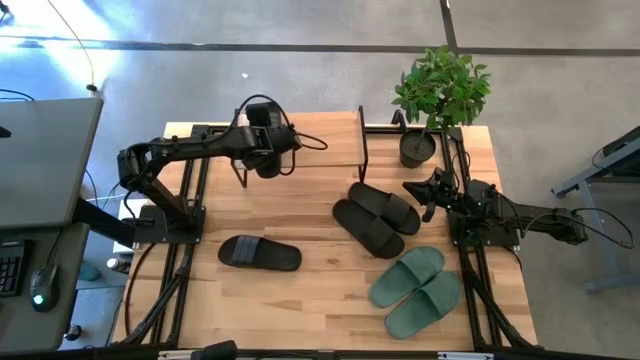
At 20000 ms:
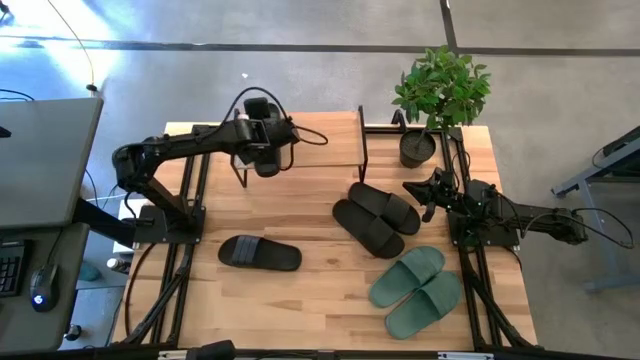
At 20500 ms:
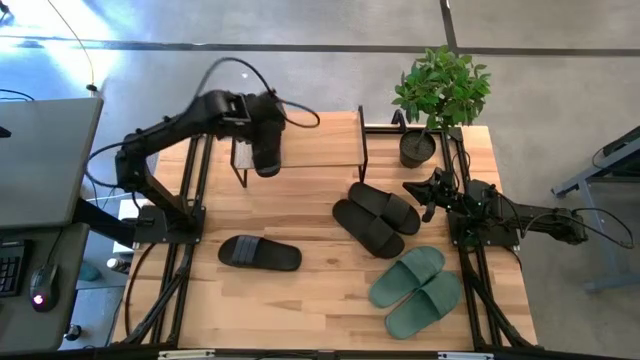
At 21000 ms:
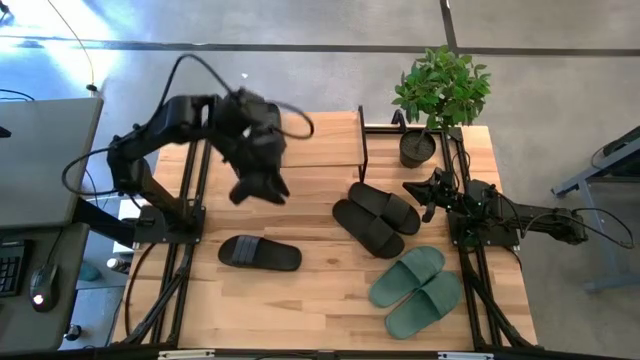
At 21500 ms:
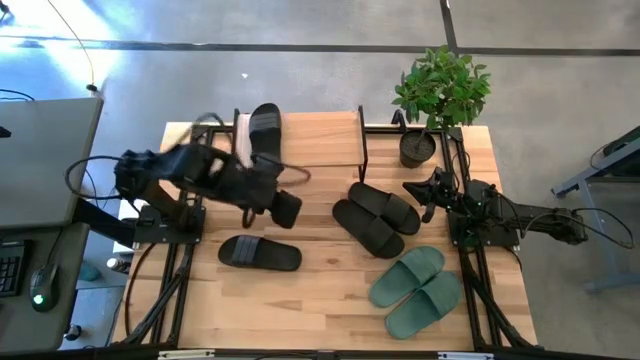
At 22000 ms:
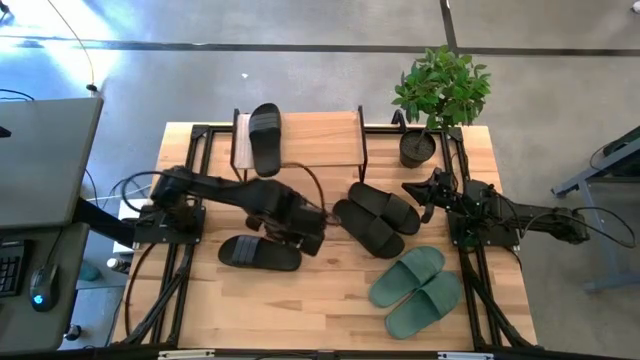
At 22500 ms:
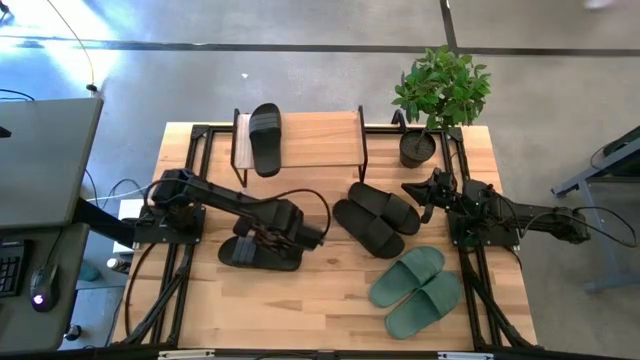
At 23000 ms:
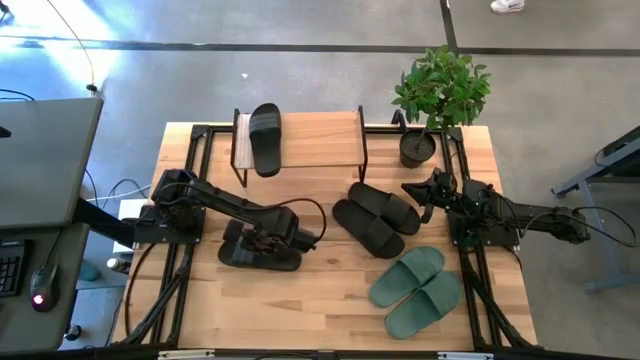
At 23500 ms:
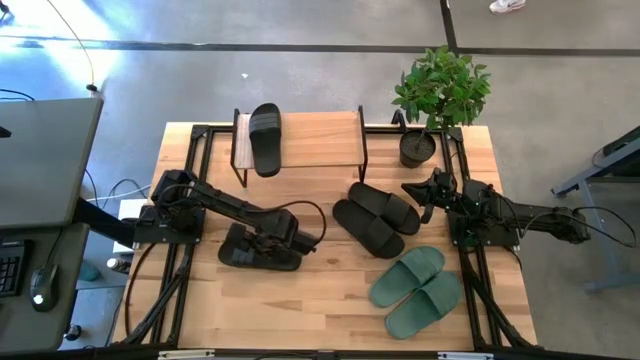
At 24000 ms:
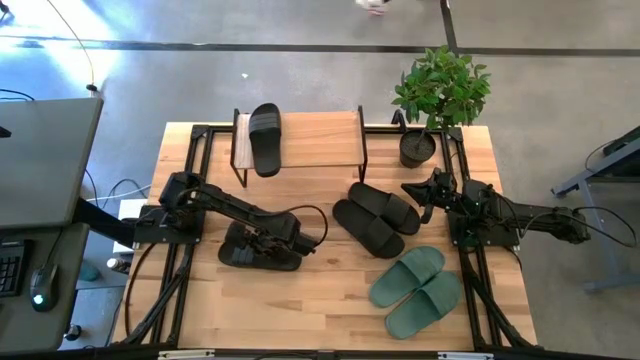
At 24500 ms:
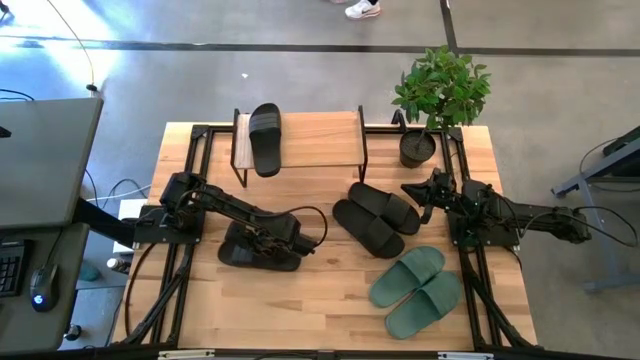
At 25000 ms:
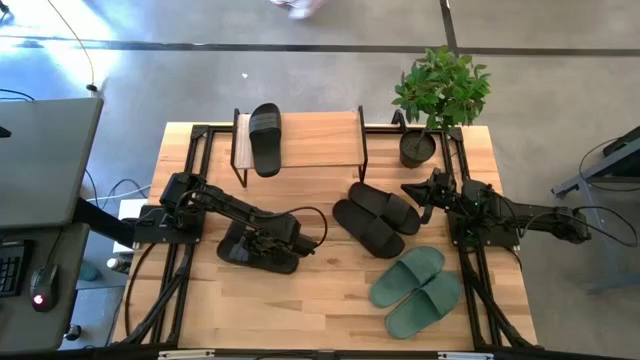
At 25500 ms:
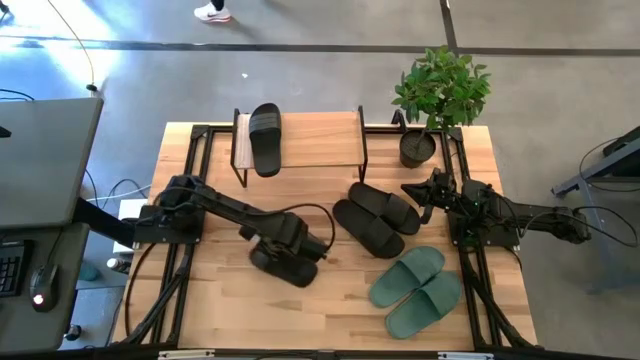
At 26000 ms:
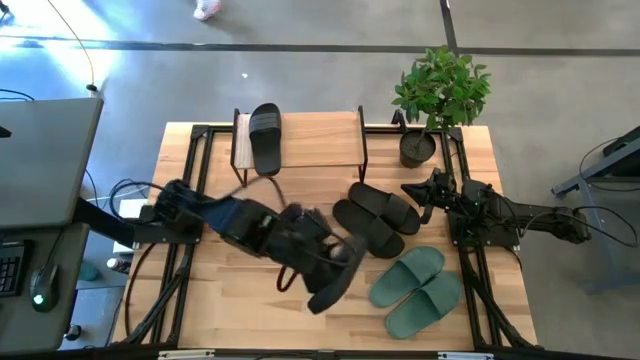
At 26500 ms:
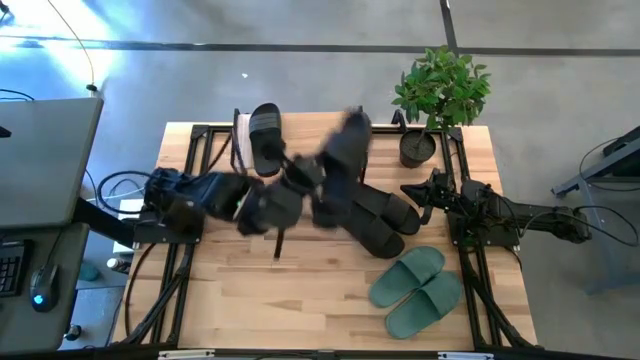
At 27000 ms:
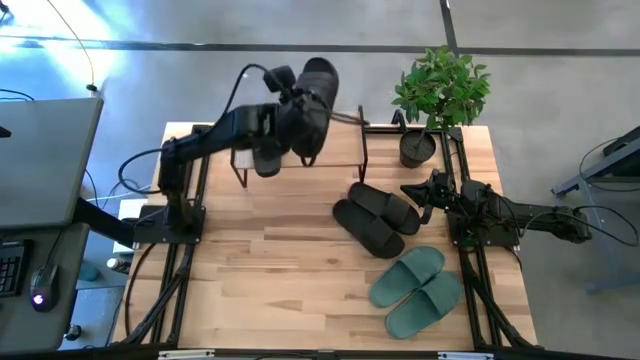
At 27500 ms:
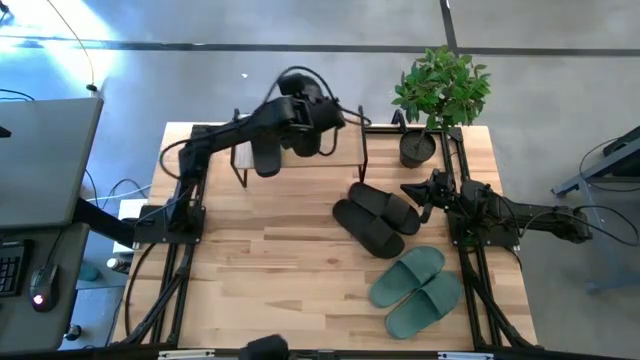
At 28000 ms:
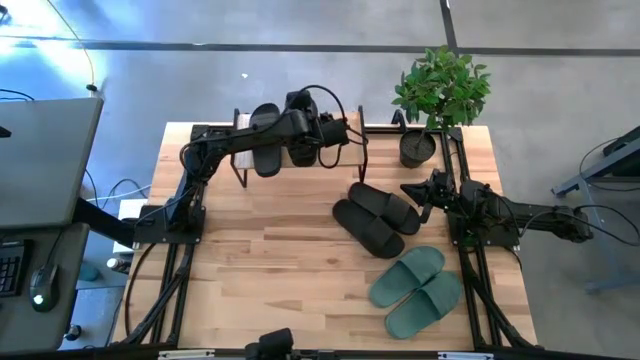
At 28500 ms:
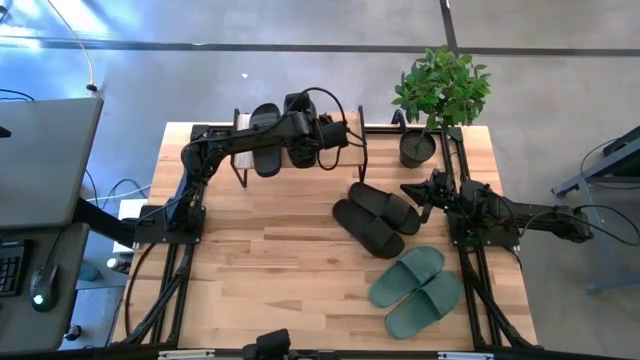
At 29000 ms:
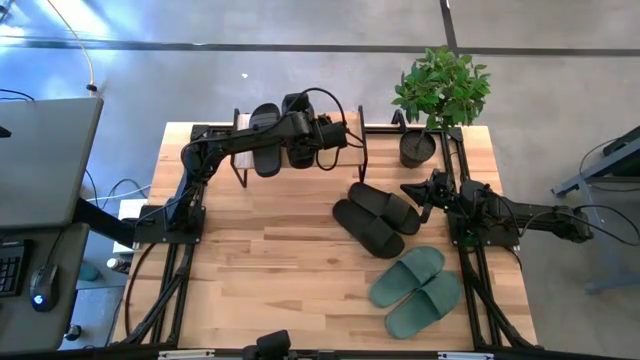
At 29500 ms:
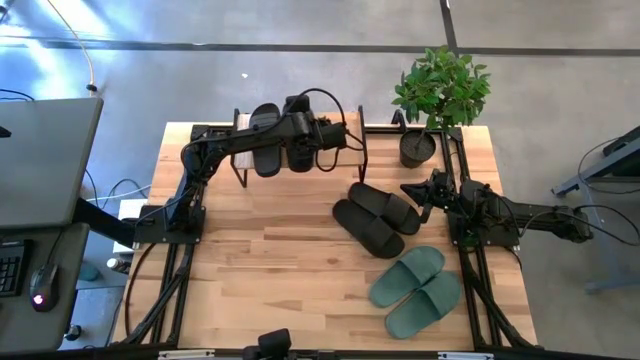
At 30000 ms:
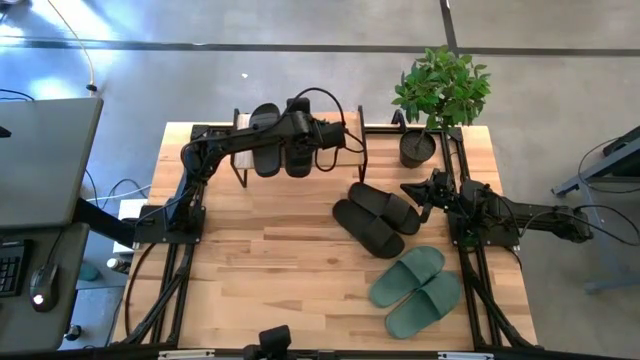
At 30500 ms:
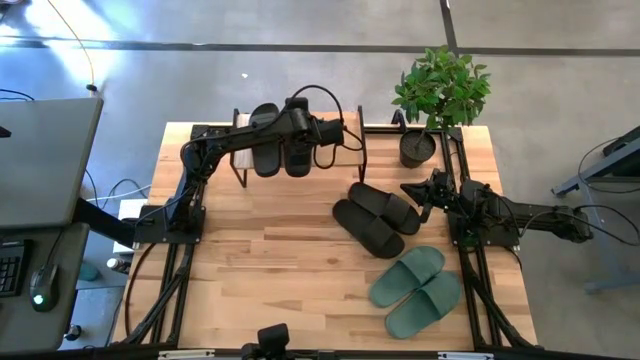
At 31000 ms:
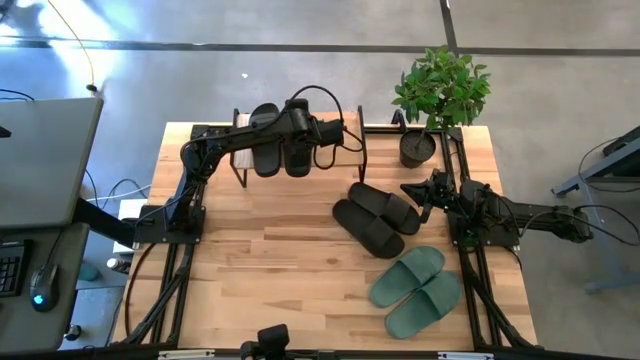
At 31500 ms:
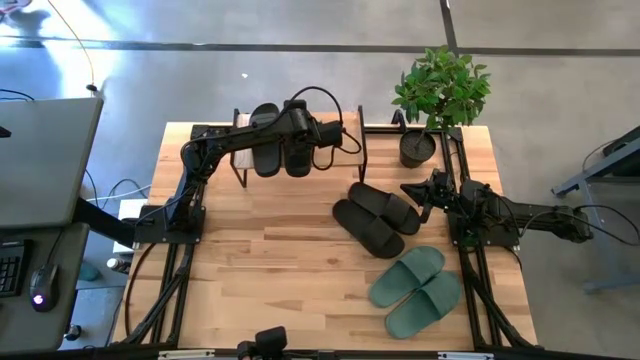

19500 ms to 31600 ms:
Task: Pick and place slides into the shelf
Put the bottom slide on the shelf

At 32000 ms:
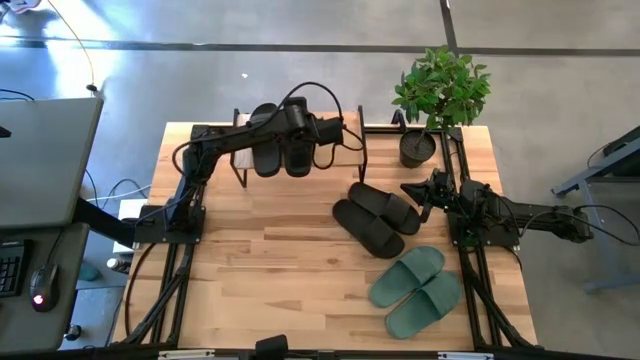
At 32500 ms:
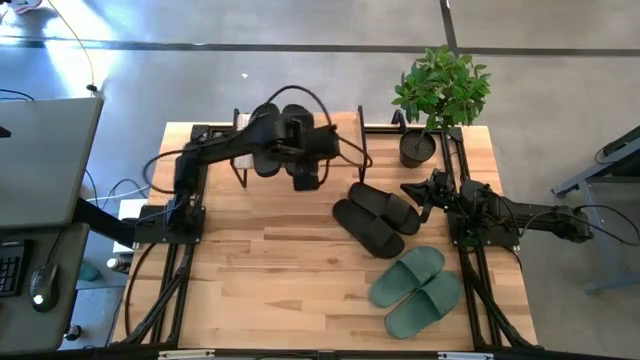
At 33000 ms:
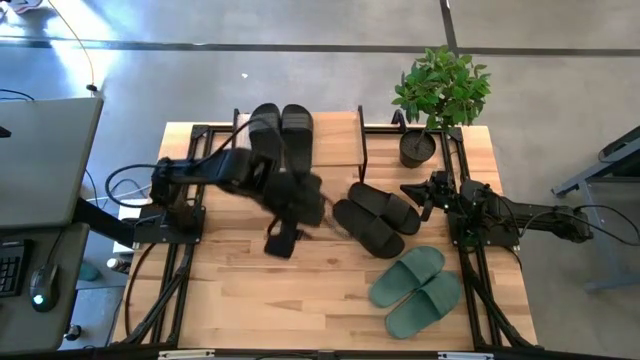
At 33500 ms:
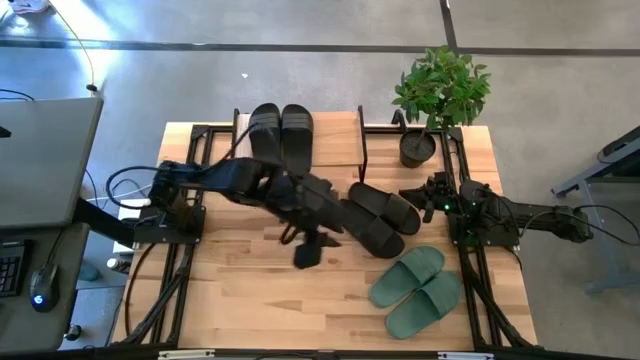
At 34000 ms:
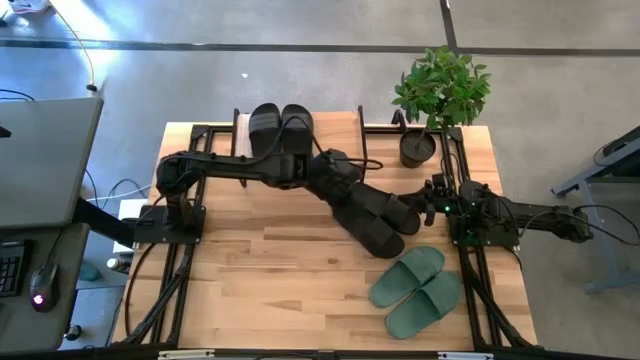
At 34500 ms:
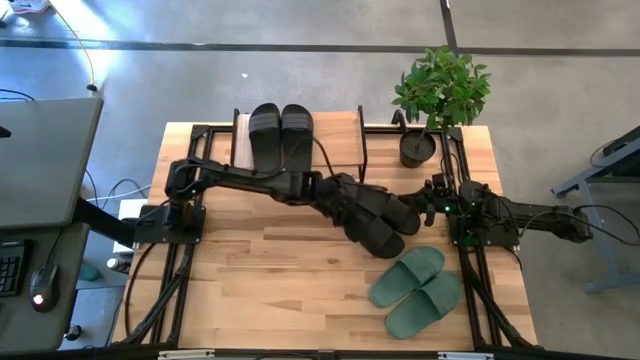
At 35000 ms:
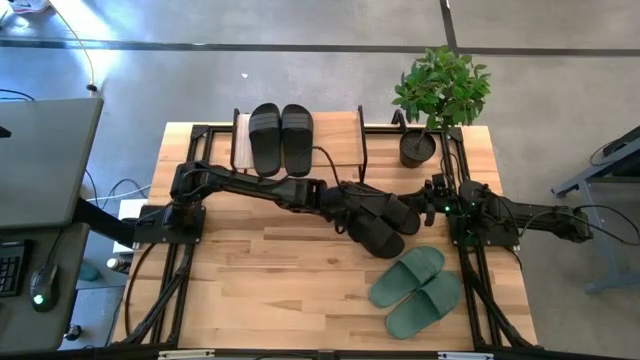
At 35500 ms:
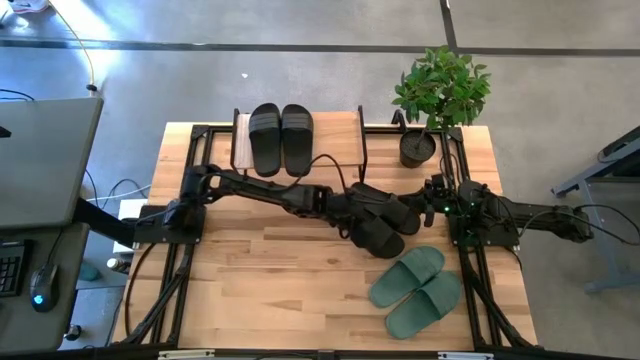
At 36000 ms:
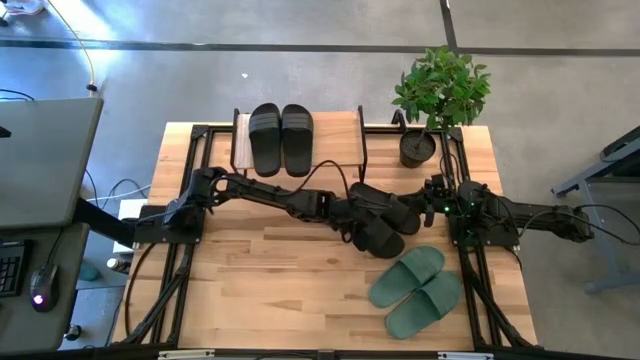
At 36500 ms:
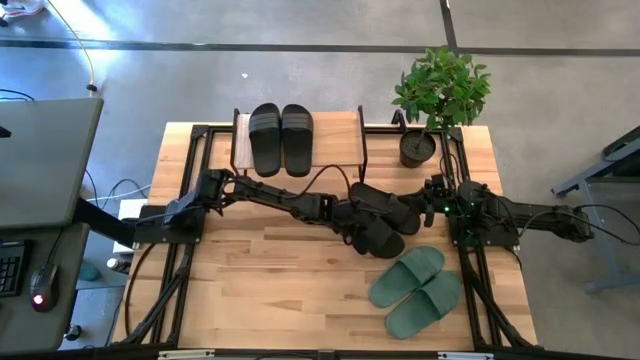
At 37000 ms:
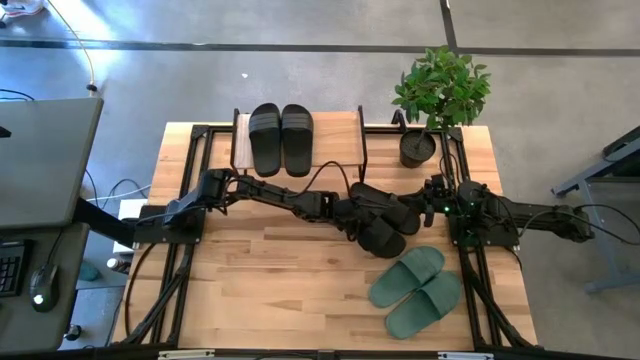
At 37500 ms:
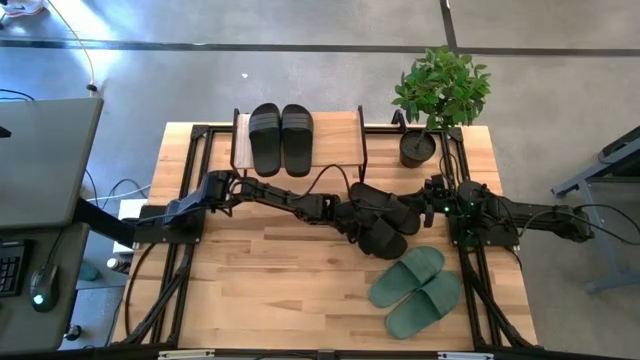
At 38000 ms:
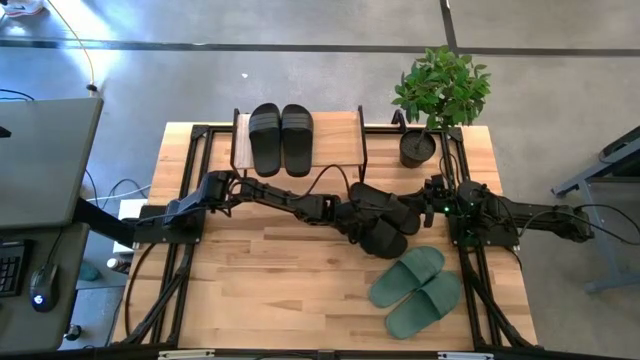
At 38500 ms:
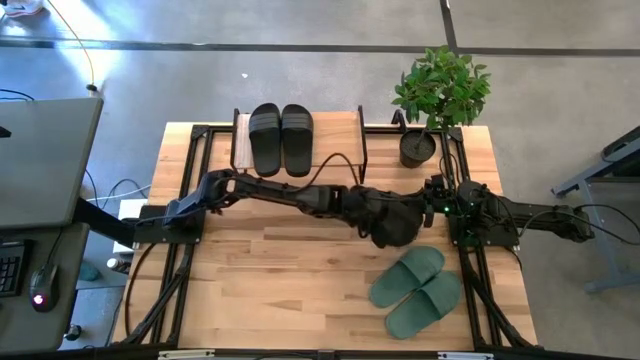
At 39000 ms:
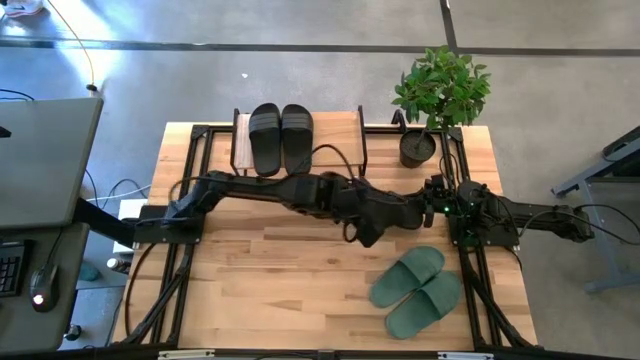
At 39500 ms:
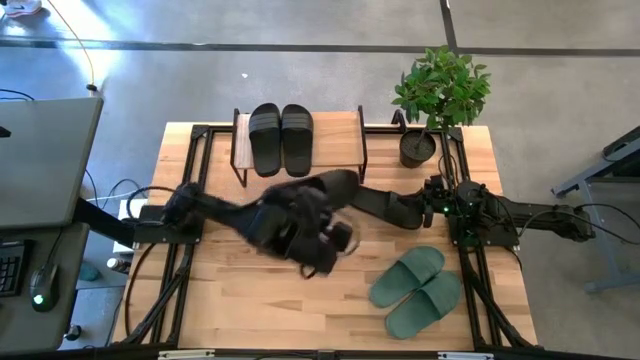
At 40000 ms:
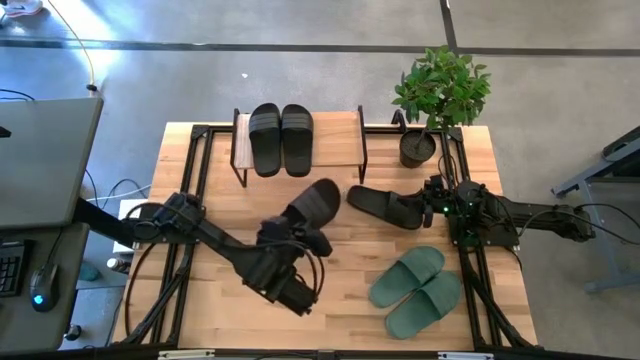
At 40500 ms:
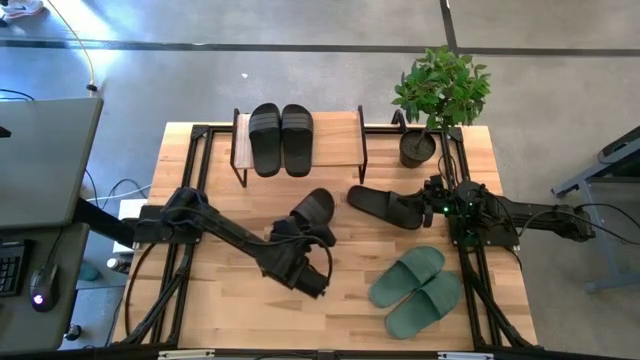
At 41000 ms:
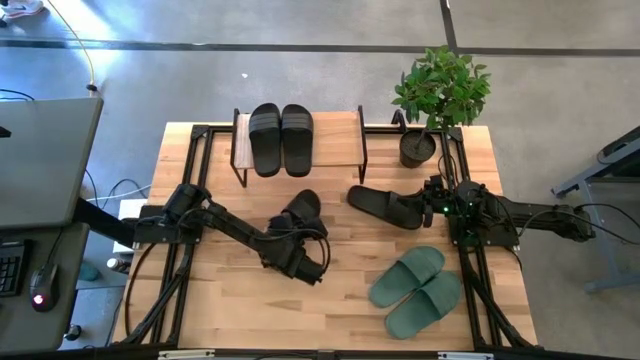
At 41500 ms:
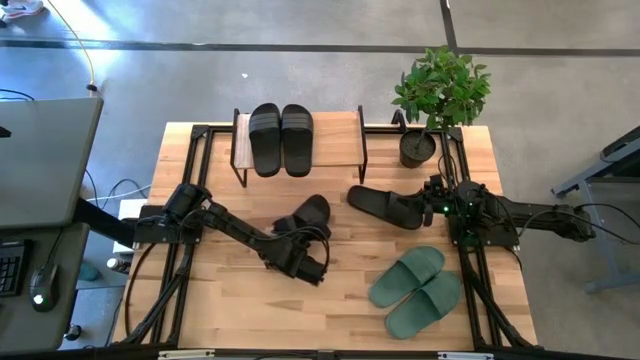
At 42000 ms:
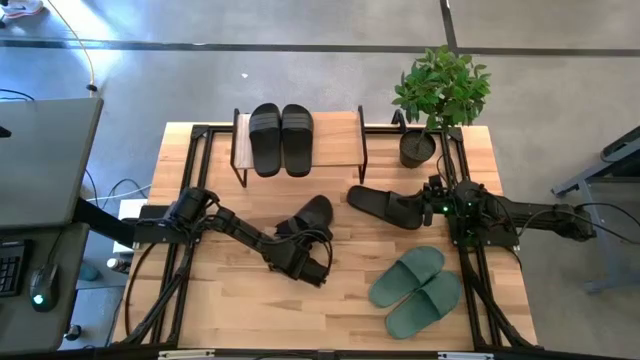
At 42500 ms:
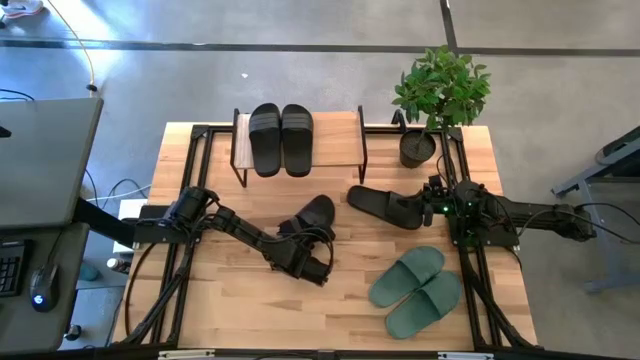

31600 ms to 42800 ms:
Move the bottom black slide to the middle of the table
